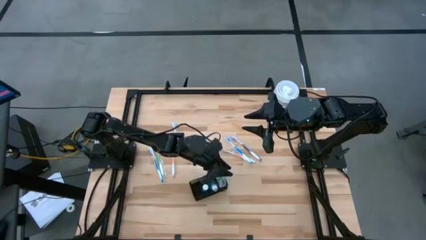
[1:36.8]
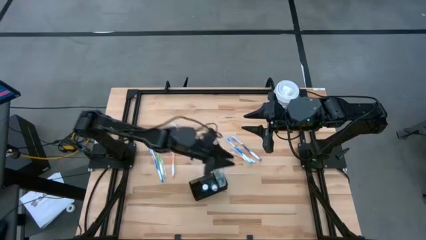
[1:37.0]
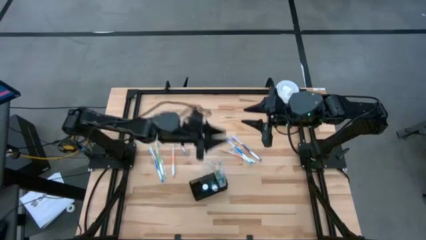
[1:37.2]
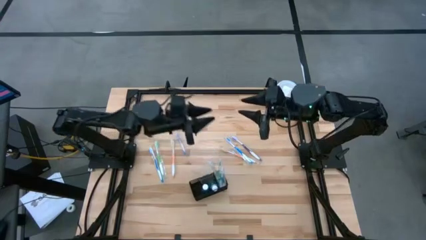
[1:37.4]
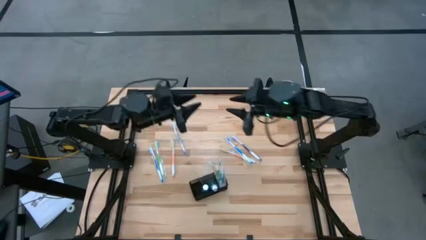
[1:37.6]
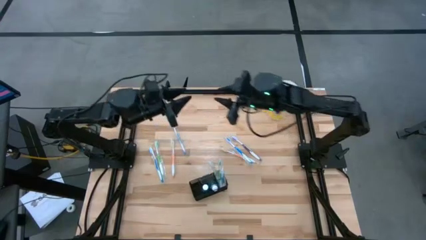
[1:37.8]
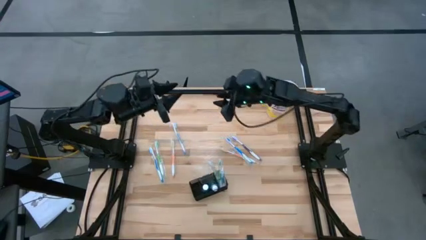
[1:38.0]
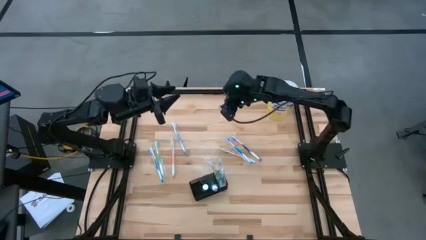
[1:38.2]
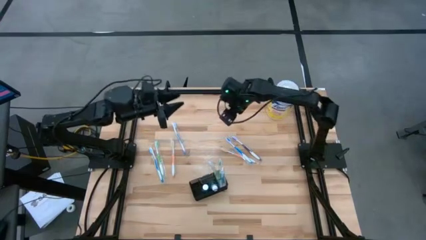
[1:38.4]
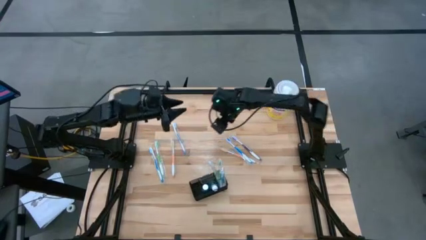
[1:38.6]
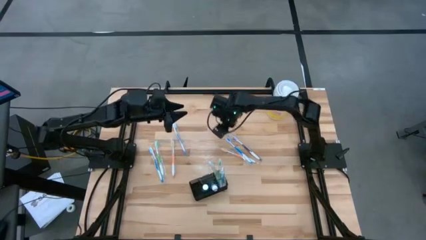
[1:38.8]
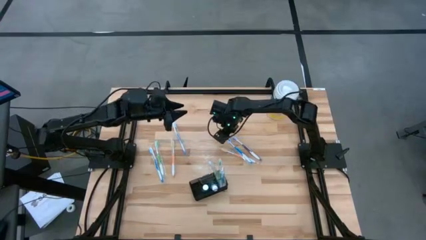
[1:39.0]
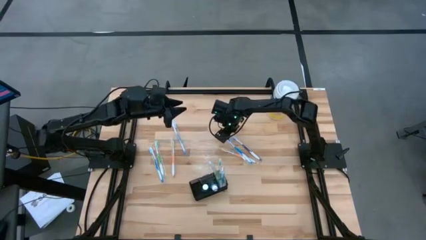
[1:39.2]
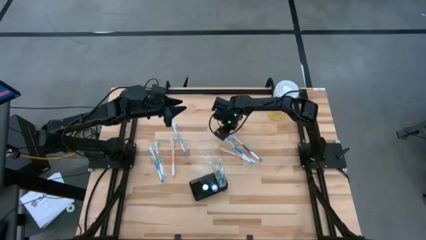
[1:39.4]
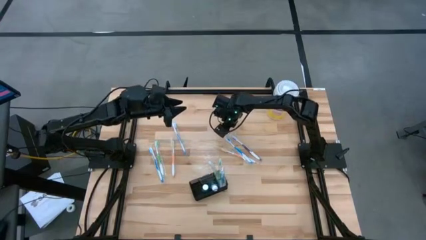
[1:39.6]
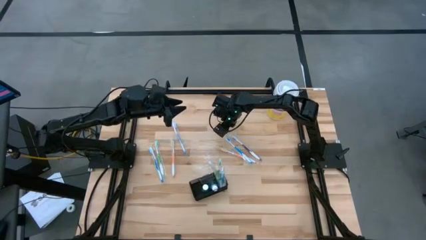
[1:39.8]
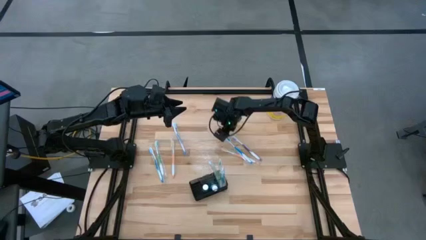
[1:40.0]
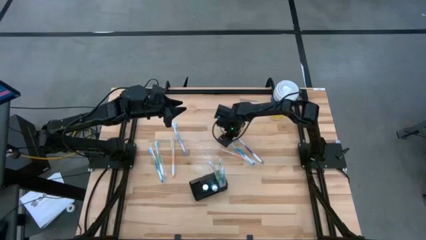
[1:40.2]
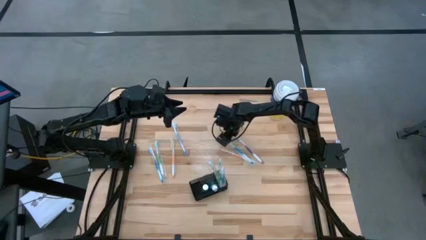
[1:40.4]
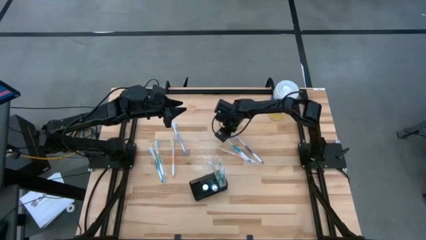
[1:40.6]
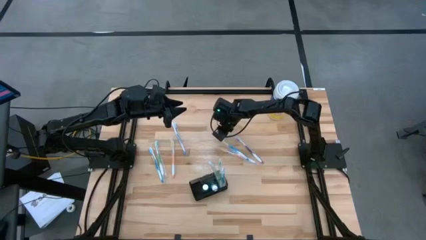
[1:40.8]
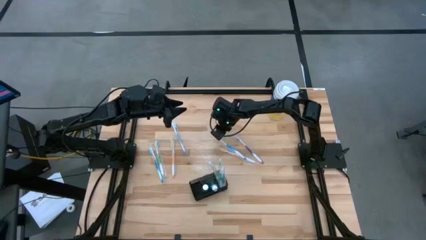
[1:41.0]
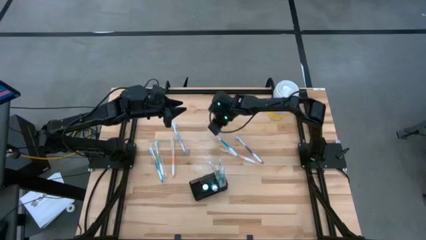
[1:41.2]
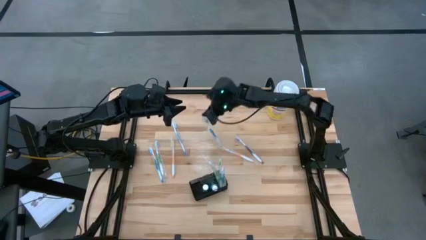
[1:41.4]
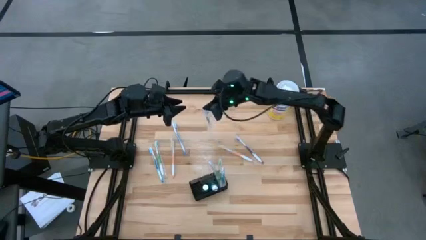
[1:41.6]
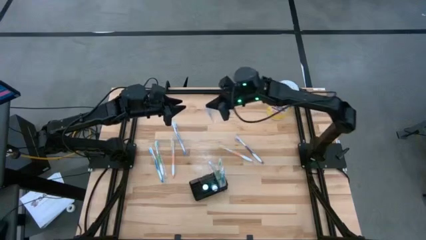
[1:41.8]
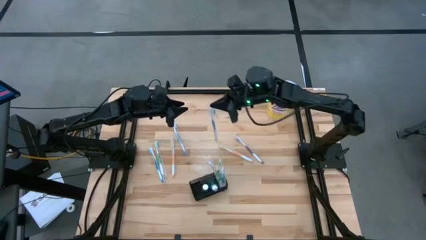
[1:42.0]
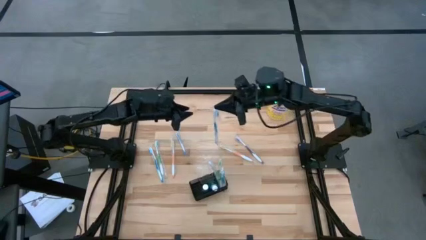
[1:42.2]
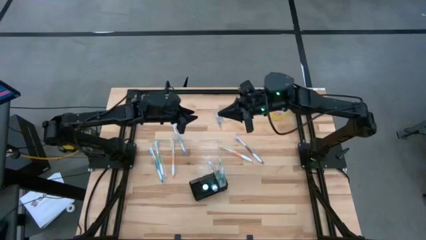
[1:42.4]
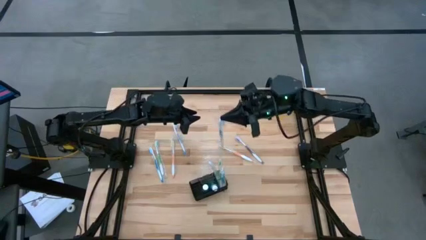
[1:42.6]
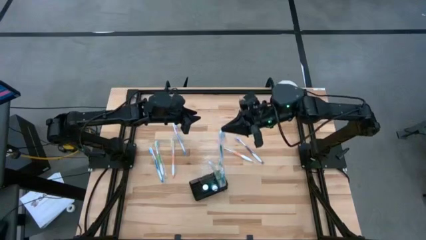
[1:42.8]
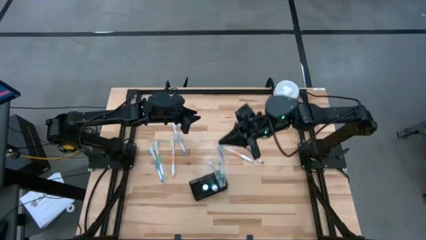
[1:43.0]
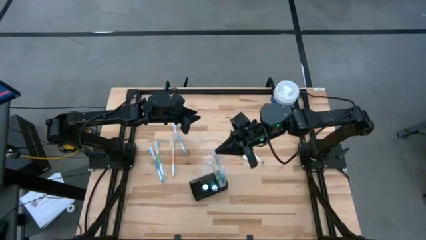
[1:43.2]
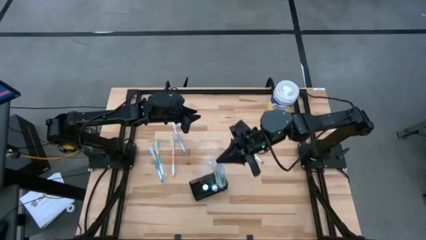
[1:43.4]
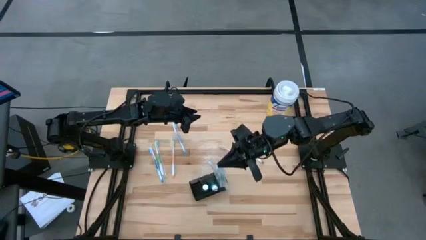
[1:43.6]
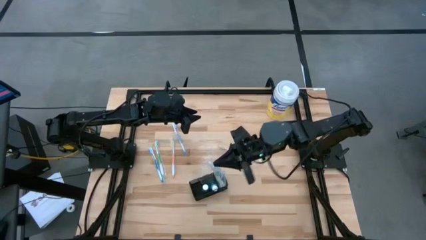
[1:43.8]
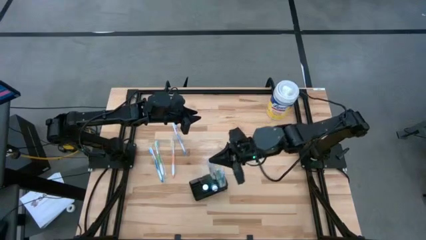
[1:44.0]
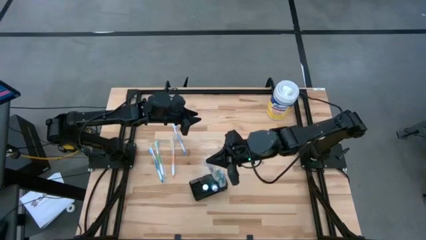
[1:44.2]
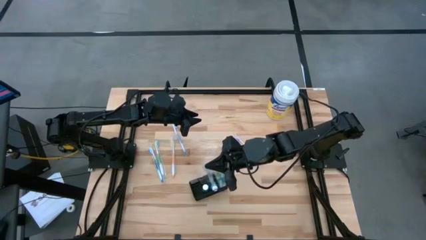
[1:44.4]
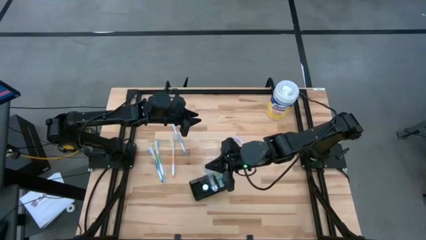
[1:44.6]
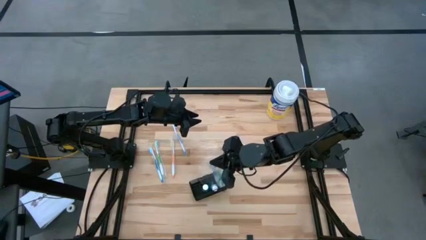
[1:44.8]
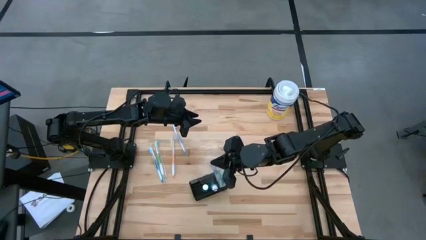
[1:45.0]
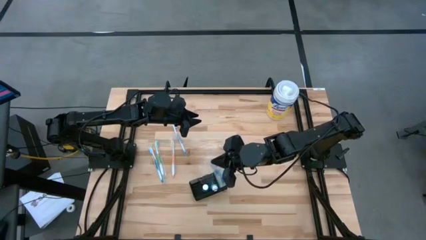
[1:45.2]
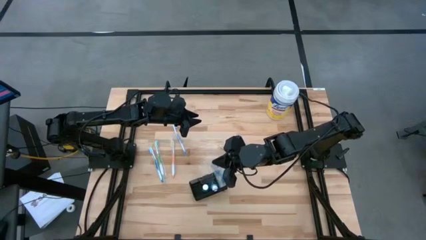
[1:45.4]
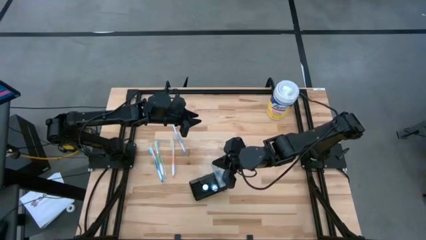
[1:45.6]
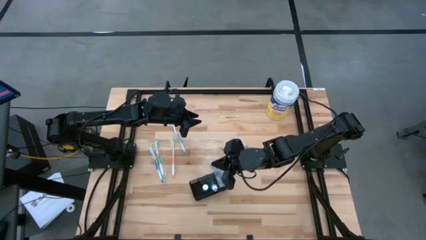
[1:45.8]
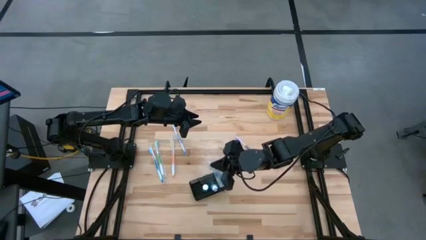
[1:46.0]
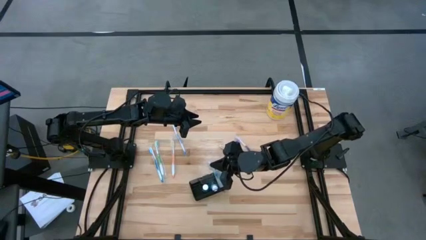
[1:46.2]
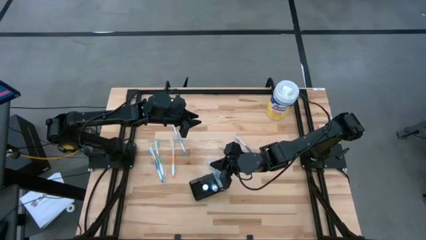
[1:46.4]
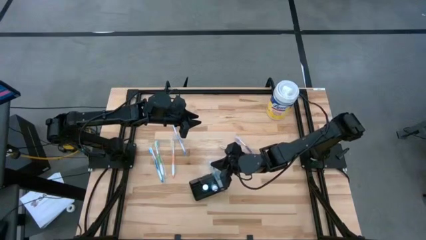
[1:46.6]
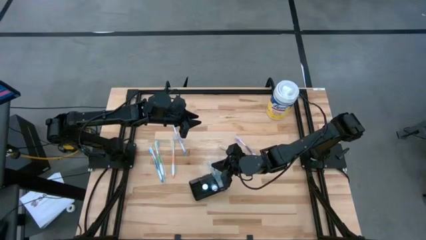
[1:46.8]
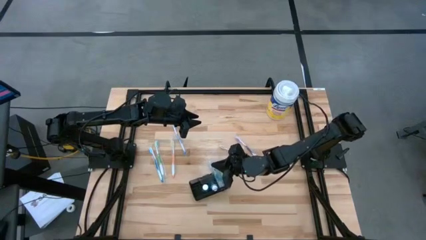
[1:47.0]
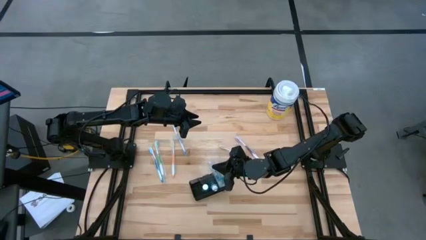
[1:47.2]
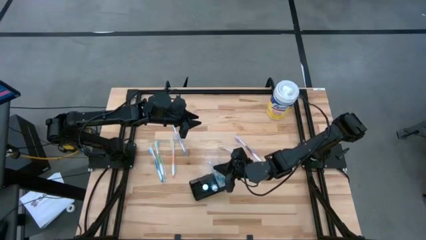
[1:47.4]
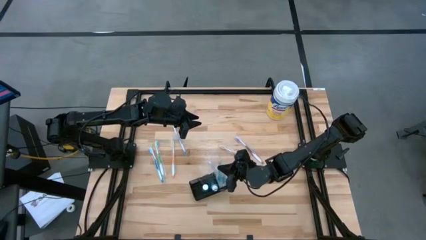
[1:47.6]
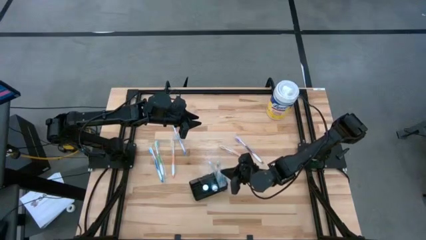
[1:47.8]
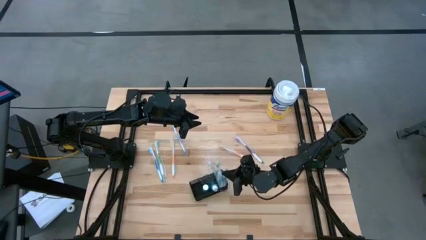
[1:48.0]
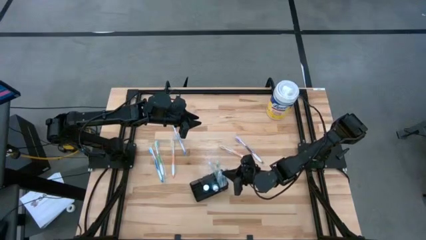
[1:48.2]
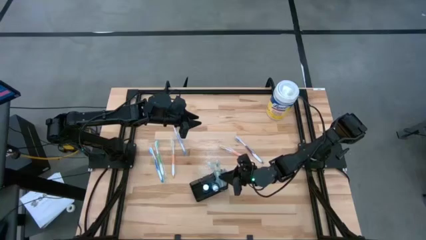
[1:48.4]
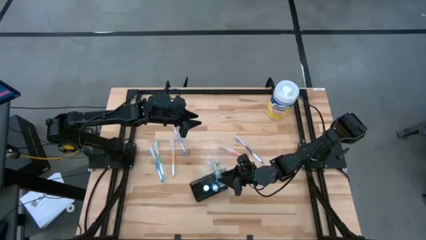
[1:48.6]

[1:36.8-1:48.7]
Task: Pick & Place toothbrushing station
Put the blue toothbrush into the mesh organizer

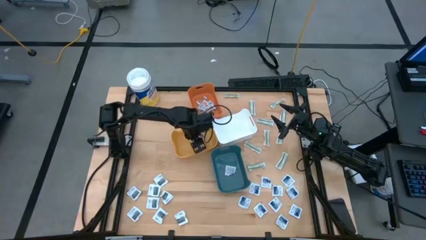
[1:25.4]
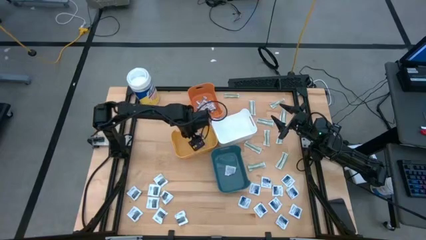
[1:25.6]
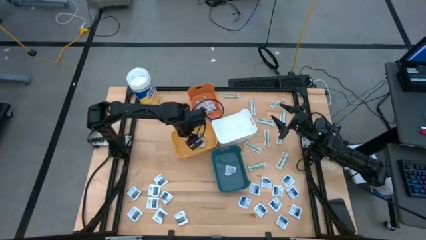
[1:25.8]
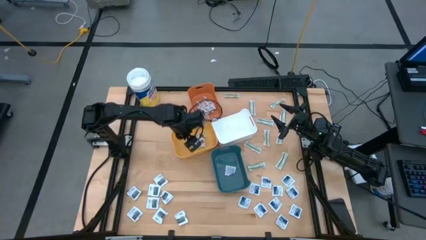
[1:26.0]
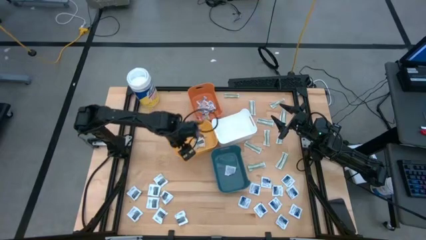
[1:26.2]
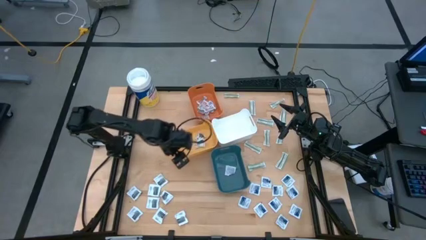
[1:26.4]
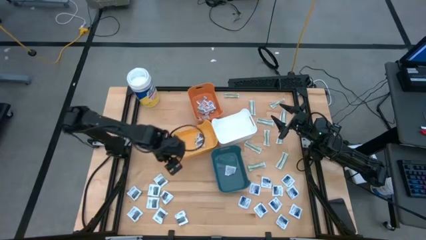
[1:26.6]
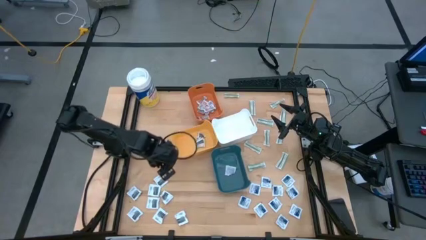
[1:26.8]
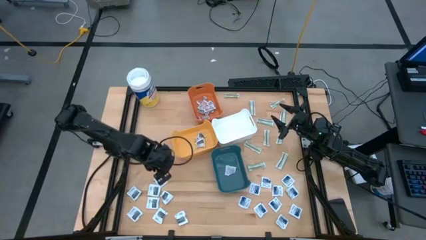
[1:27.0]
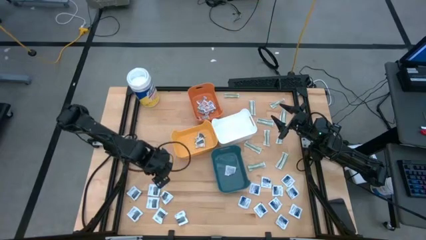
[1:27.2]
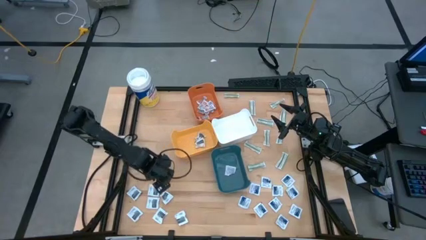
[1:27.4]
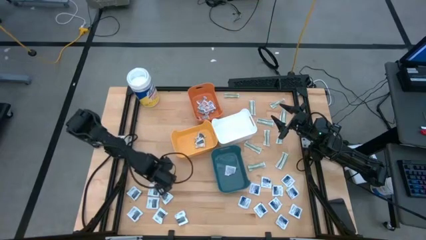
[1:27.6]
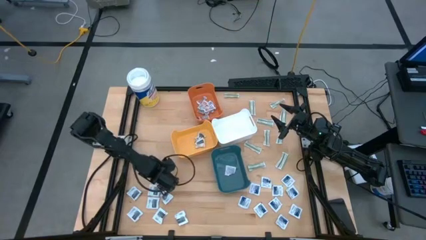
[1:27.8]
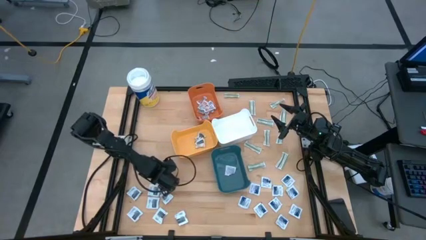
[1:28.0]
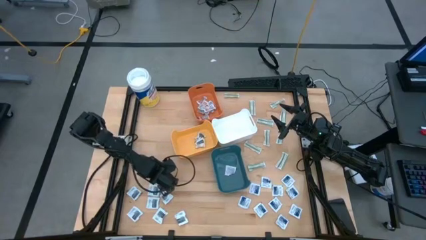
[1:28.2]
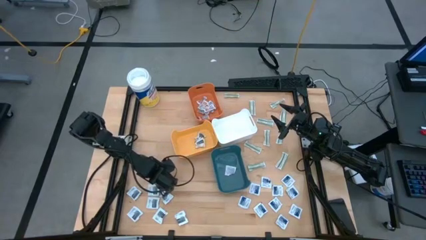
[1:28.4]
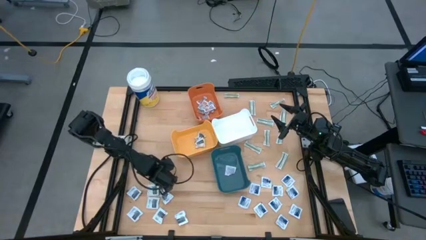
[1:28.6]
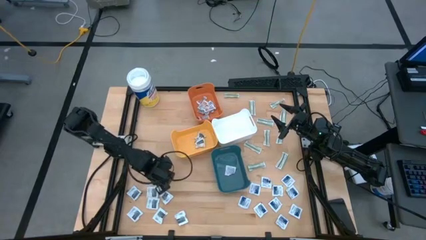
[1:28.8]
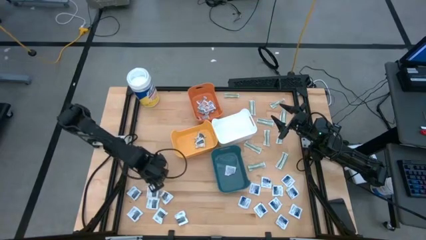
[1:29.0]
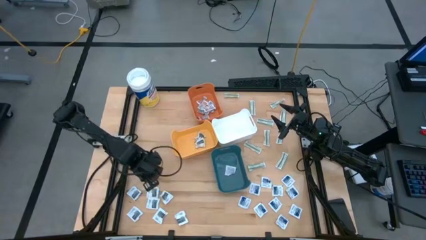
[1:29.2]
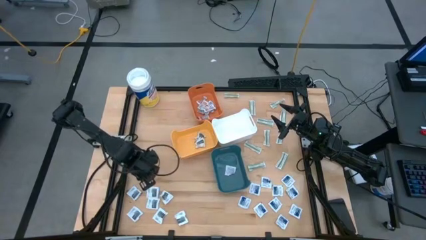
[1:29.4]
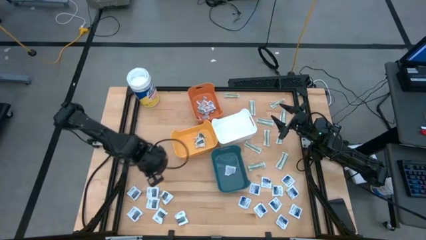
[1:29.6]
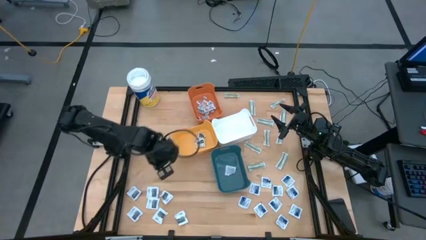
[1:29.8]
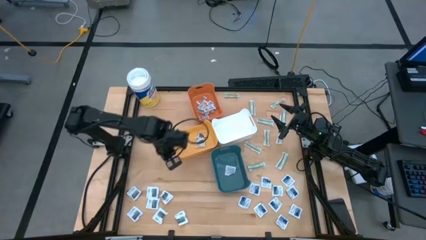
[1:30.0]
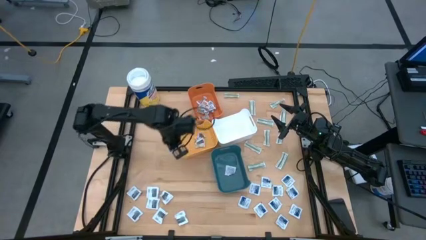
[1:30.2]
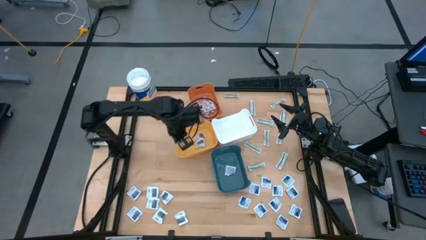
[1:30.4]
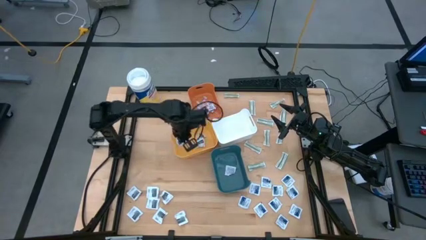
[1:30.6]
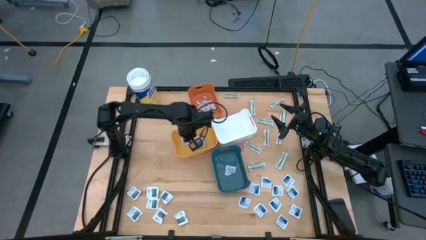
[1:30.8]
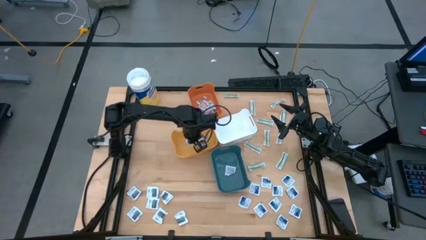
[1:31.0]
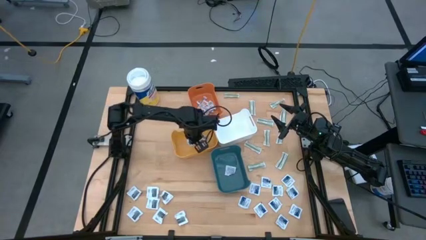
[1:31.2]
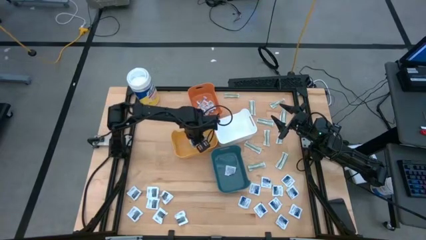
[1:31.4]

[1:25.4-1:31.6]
Task: Pick & Place First Aid Supplies
Put the black towelette pack into the yellow bin
